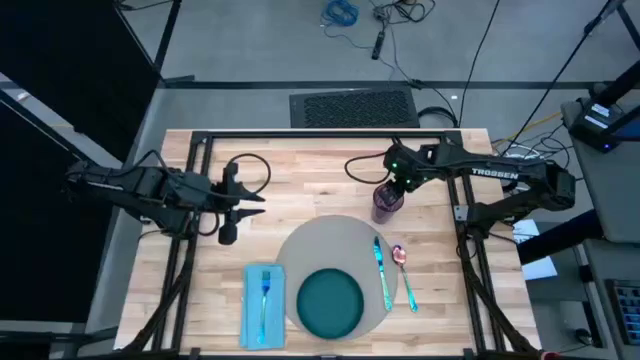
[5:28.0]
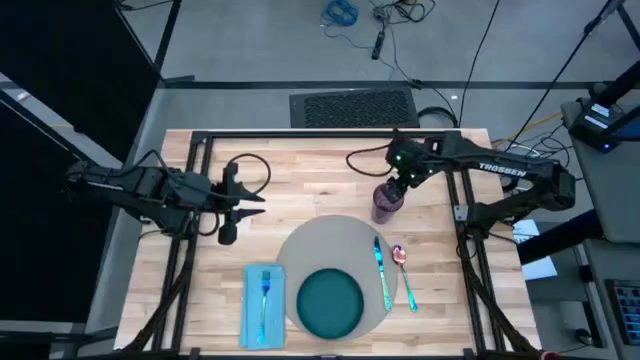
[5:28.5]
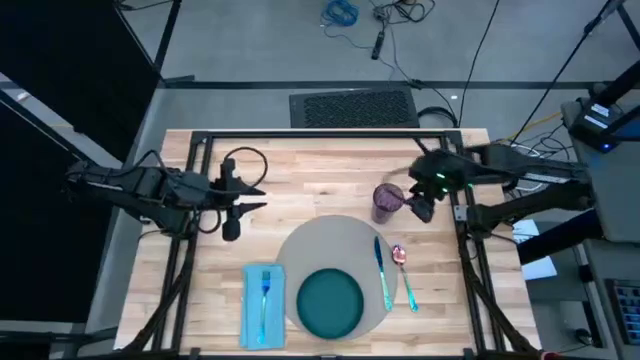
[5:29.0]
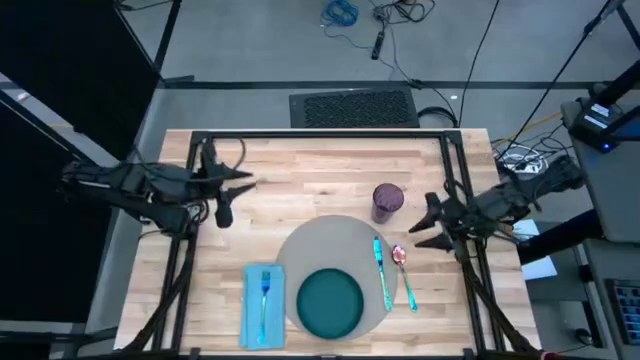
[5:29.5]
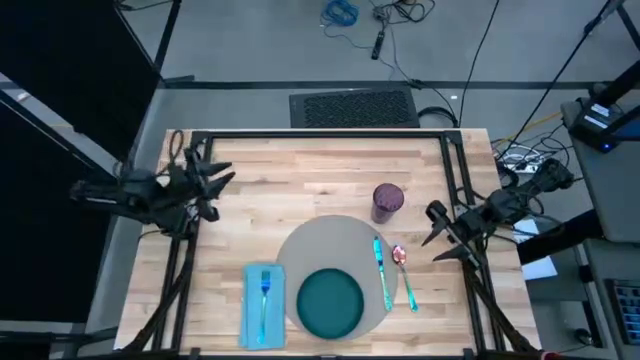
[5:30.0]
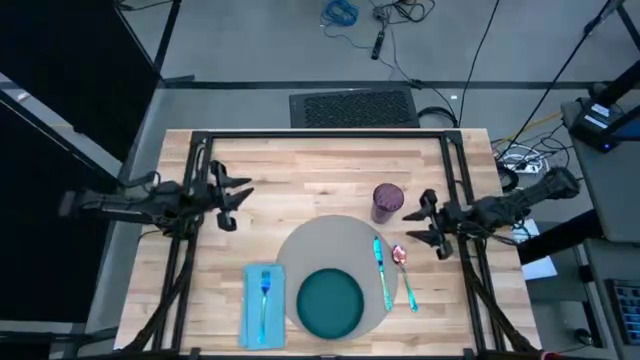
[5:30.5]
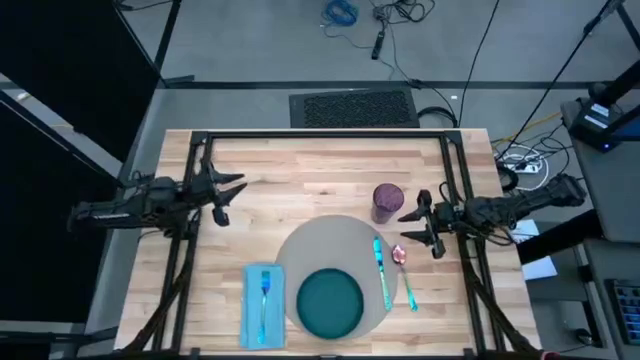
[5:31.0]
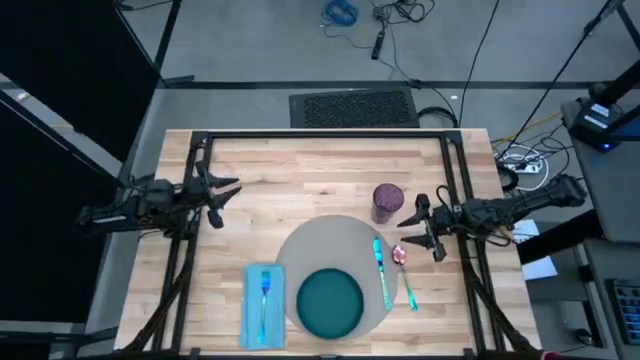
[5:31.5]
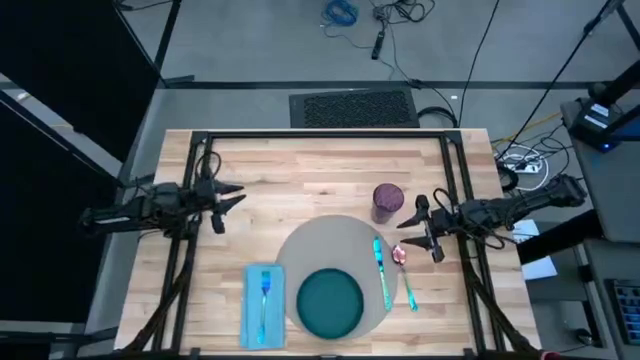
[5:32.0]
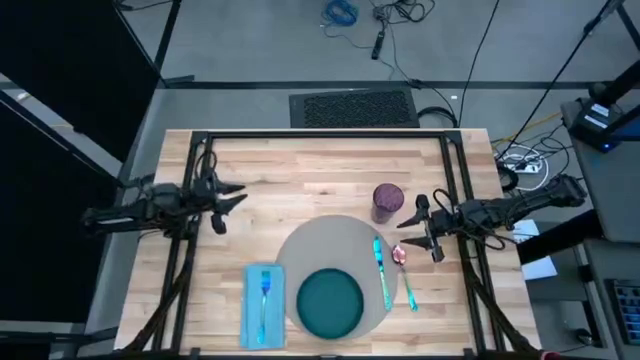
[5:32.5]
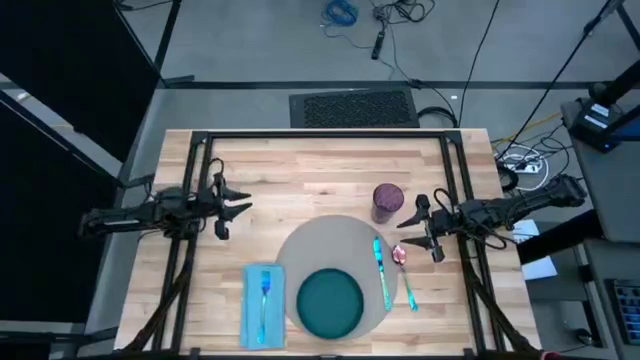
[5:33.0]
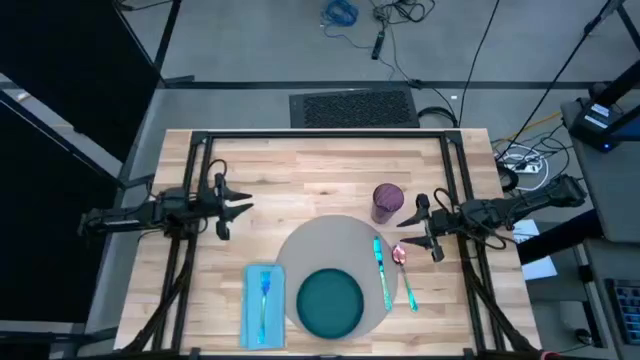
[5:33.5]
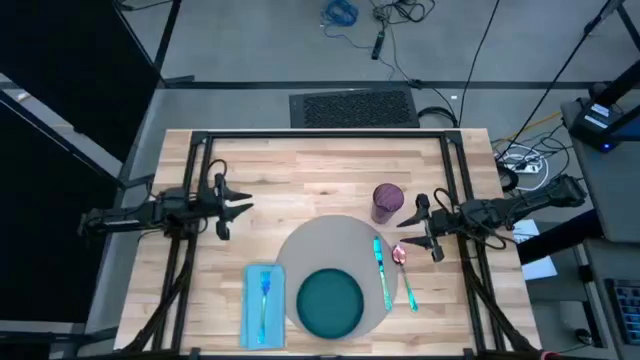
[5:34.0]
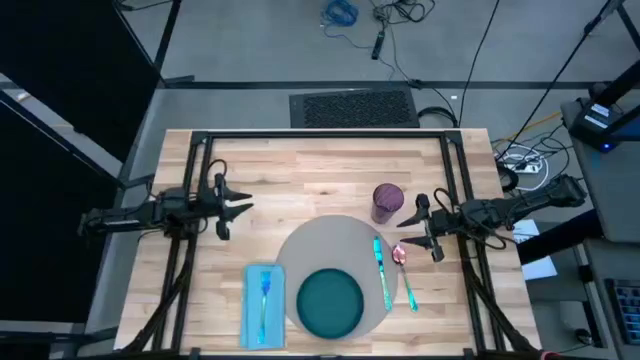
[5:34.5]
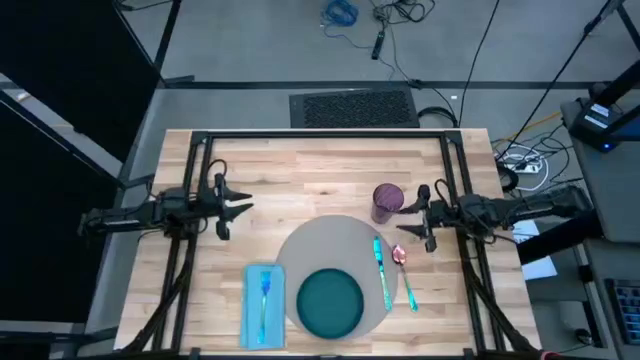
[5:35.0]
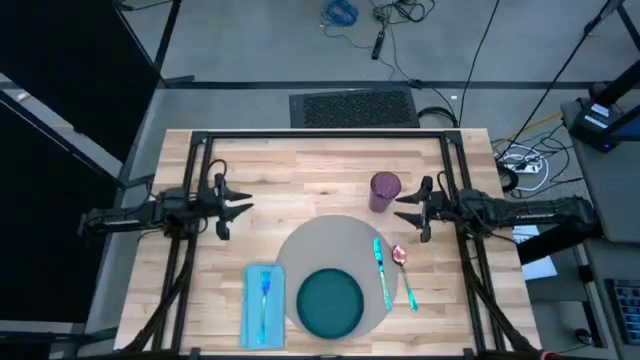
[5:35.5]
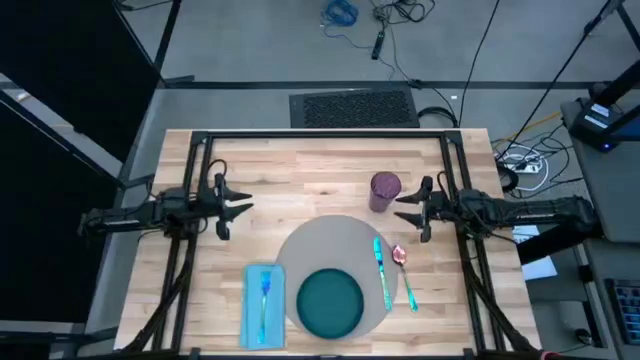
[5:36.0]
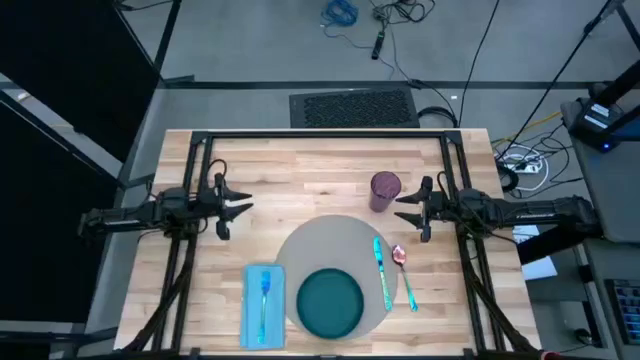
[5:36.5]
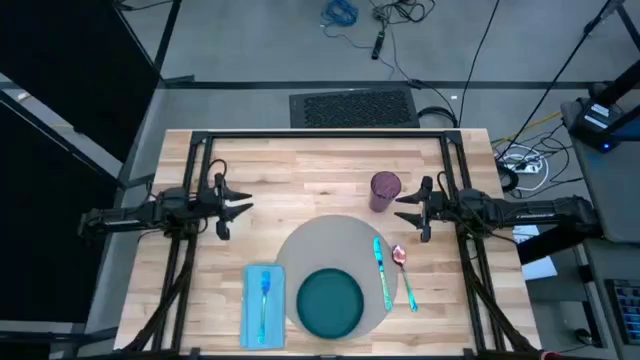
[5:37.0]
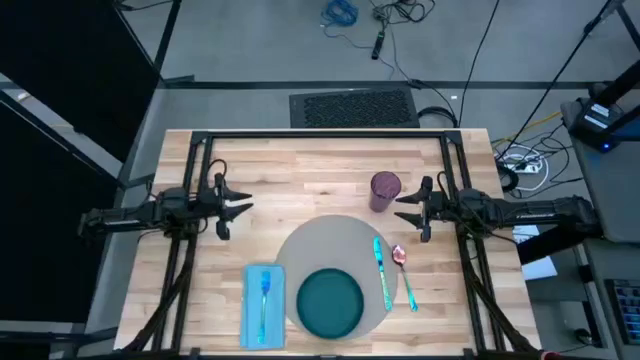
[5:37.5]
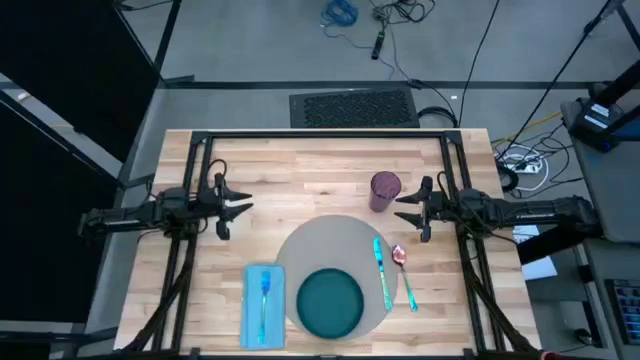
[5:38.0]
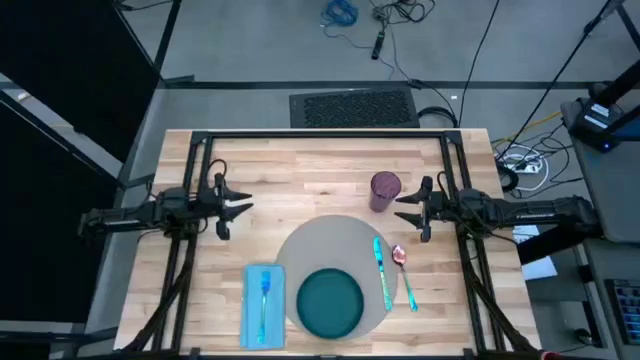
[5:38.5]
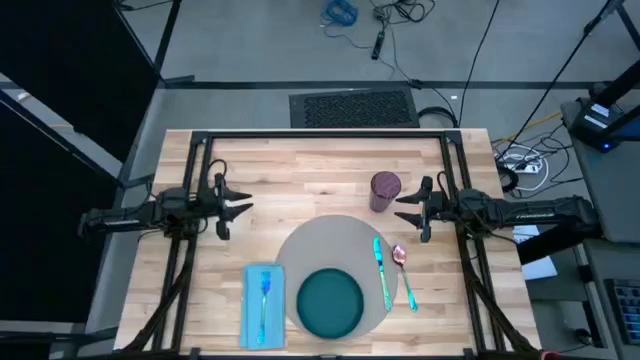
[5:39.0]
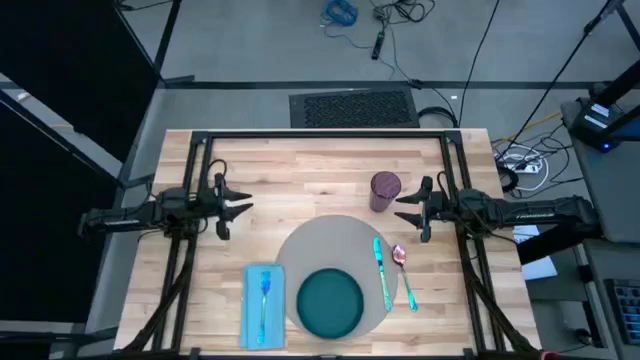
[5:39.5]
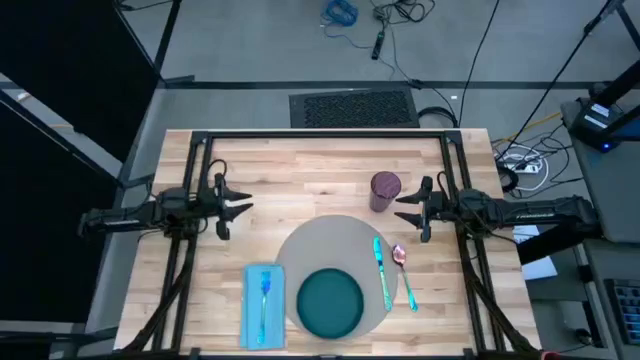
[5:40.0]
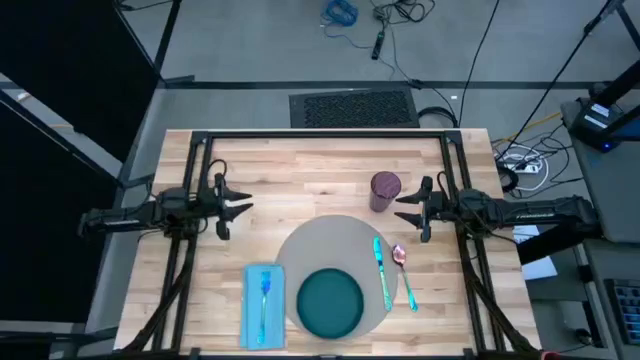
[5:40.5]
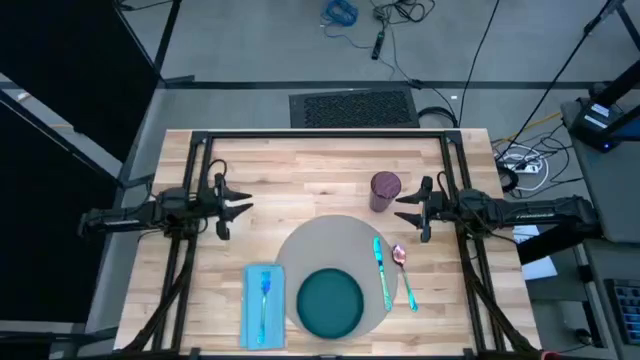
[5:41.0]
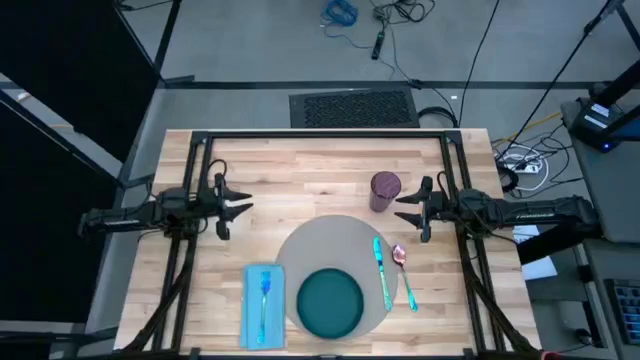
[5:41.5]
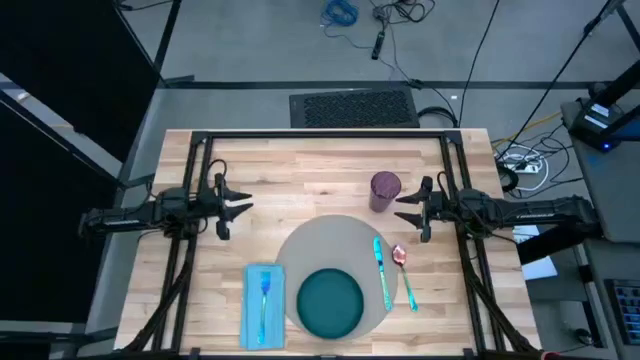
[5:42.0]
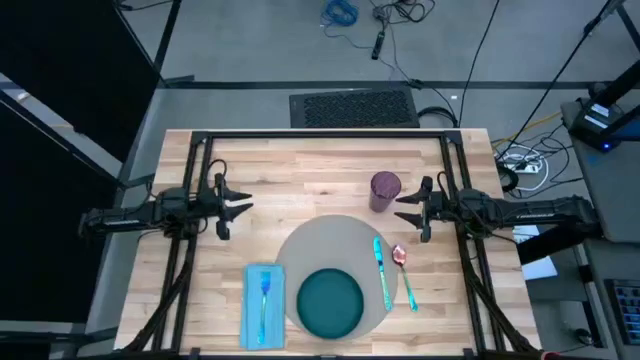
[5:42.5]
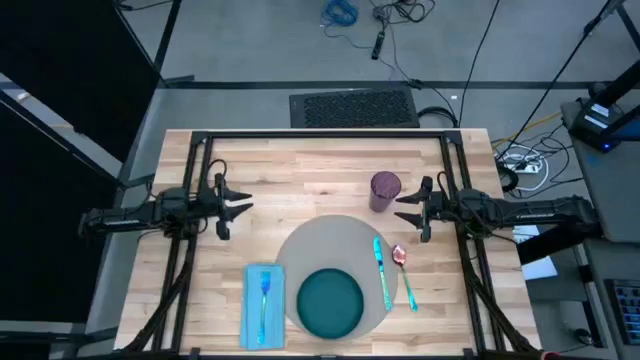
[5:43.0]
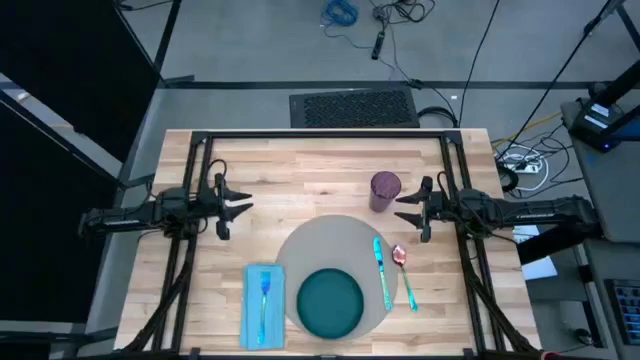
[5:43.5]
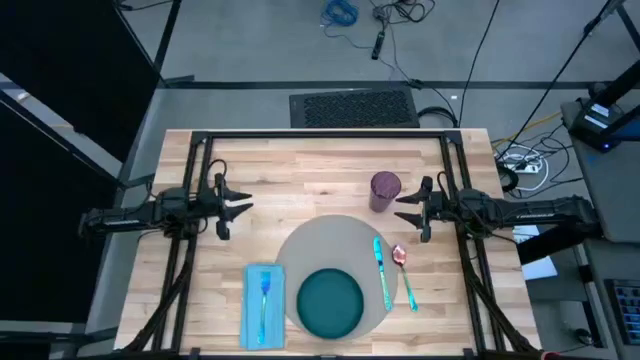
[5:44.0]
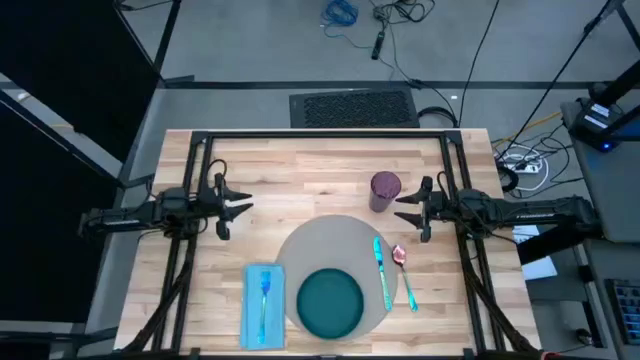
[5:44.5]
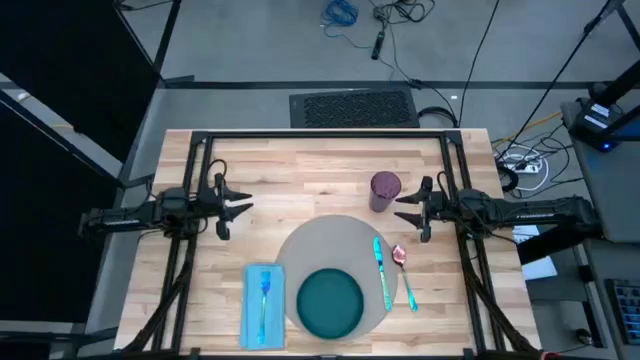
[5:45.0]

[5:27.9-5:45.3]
Task: Set table place
Return to Home Position

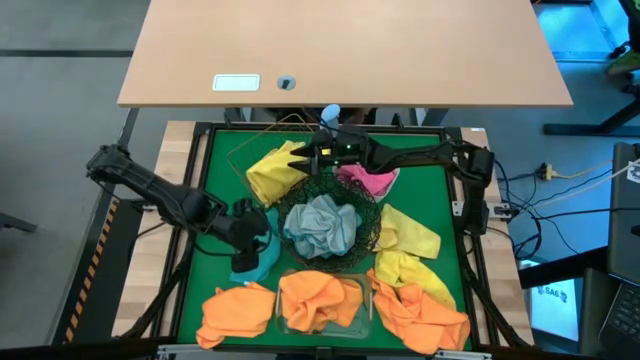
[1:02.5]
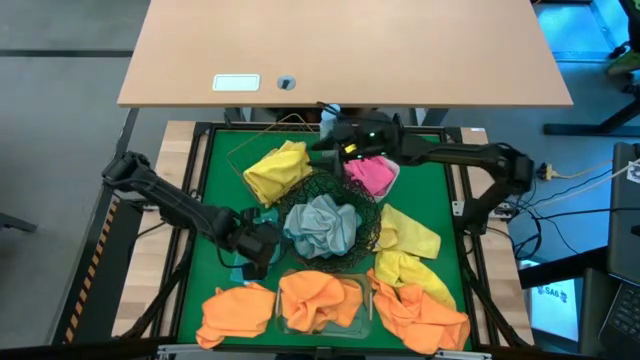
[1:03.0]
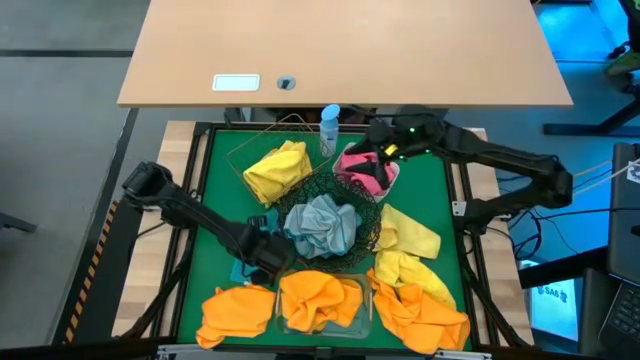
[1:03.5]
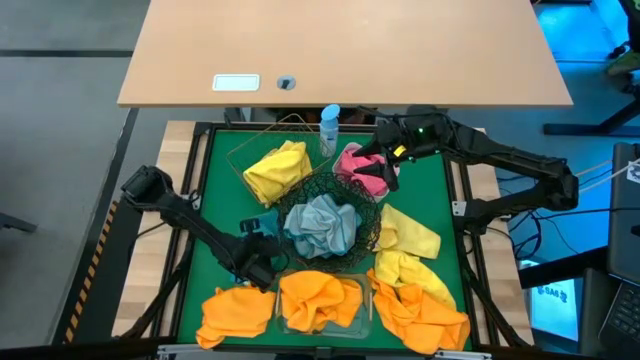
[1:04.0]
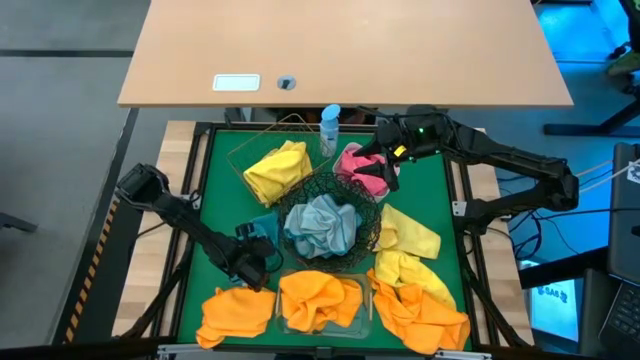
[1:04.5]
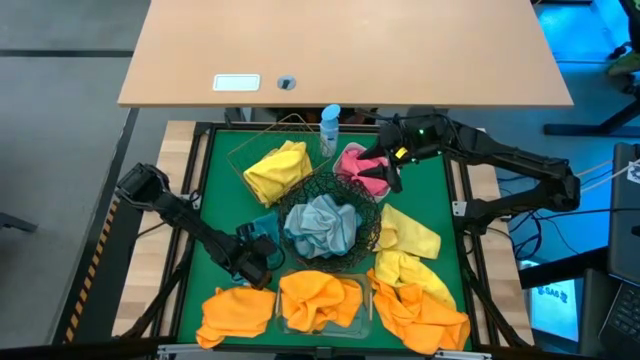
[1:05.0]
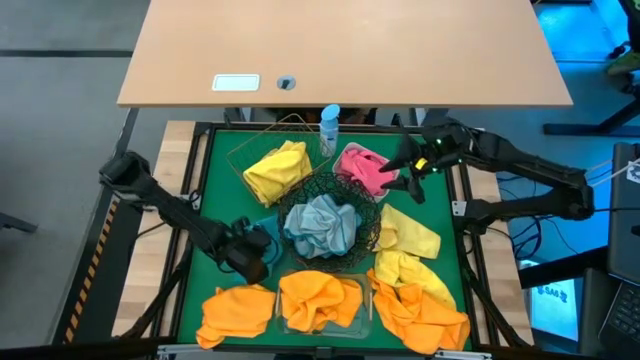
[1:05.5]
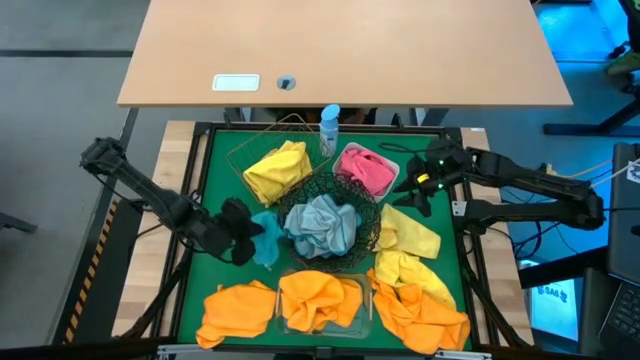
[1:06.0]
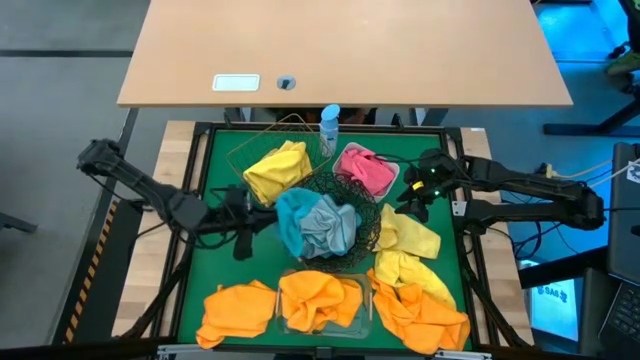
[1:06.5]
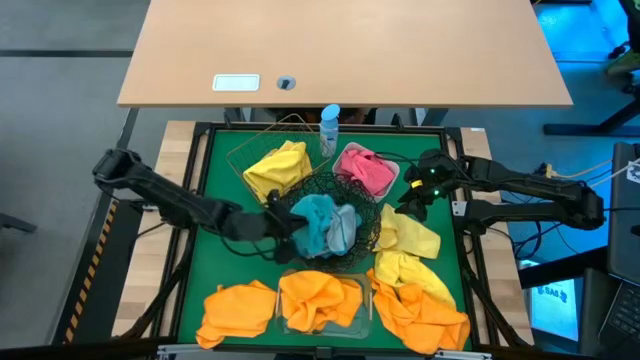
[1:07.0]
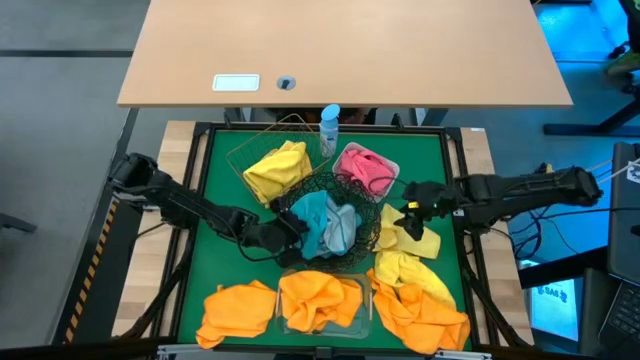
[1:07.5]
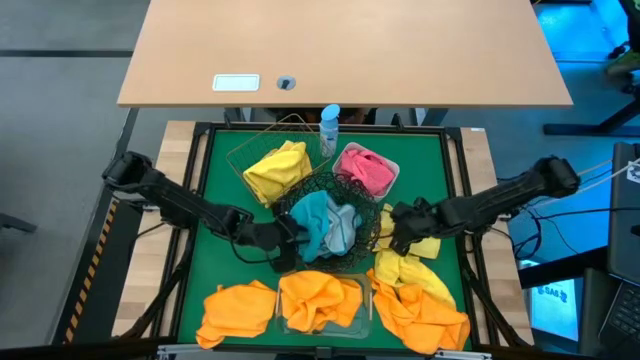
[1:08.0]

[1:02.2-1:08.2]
Task: Sort microfiber towel by color & place in baskets
Put the blue microfiber towel into the black wire basket
